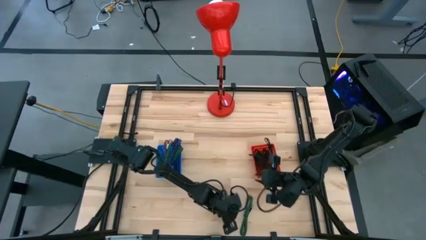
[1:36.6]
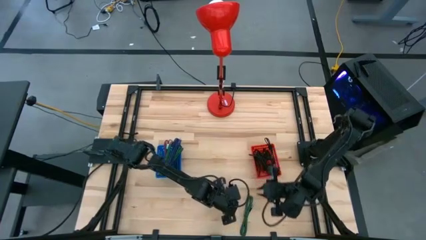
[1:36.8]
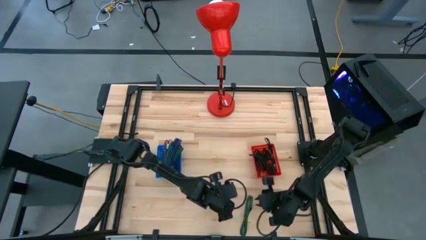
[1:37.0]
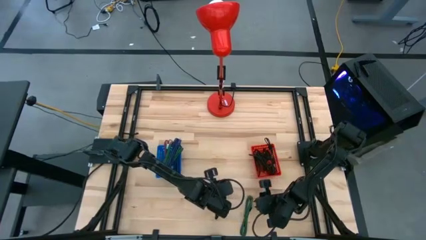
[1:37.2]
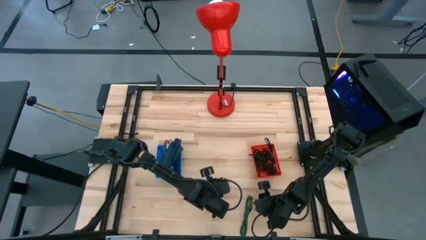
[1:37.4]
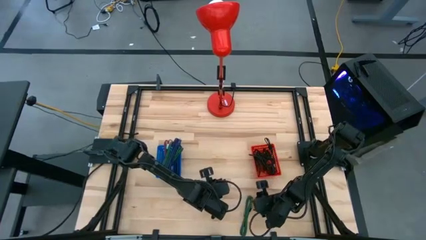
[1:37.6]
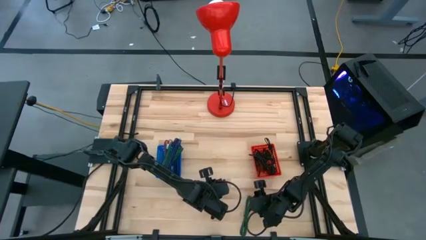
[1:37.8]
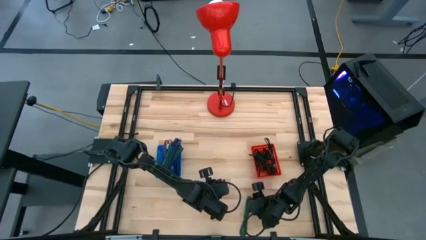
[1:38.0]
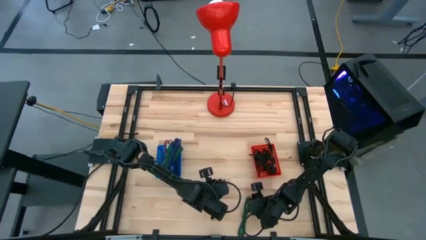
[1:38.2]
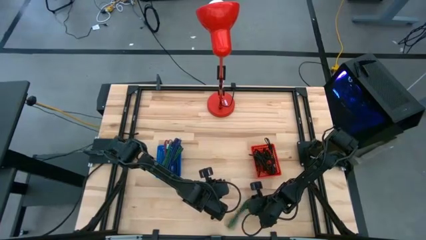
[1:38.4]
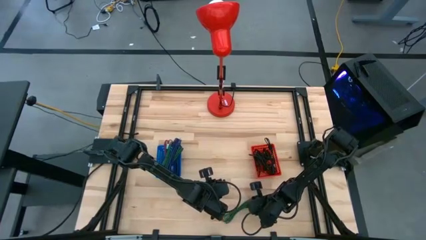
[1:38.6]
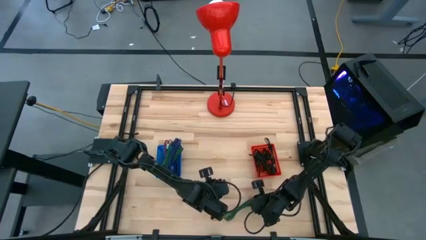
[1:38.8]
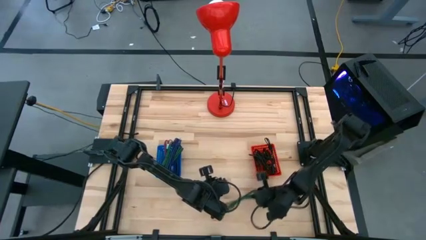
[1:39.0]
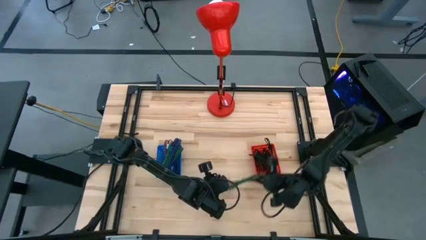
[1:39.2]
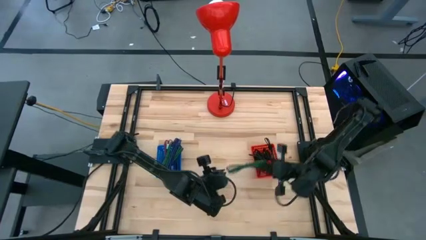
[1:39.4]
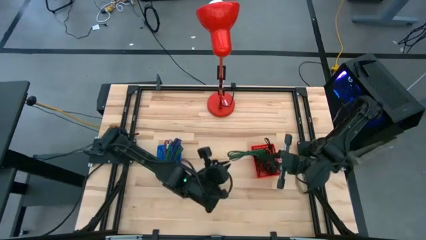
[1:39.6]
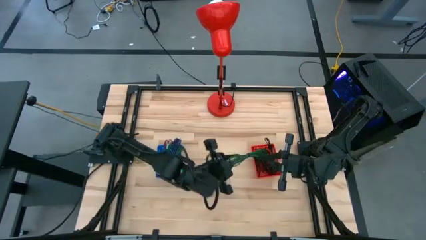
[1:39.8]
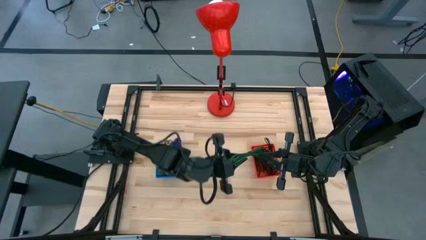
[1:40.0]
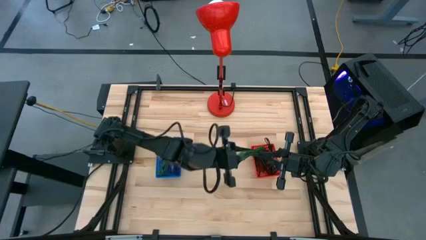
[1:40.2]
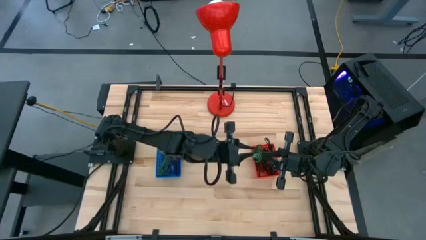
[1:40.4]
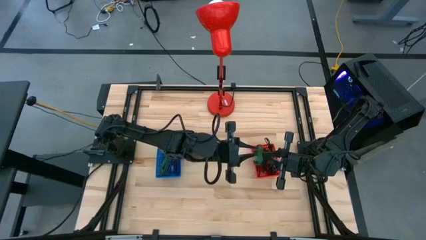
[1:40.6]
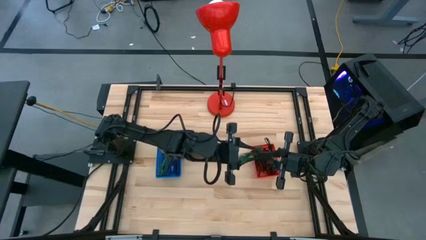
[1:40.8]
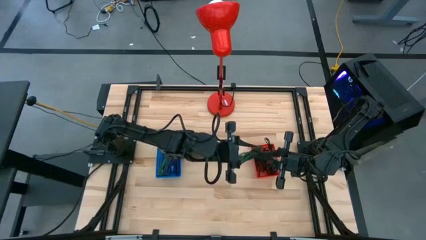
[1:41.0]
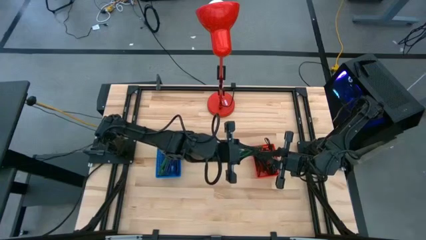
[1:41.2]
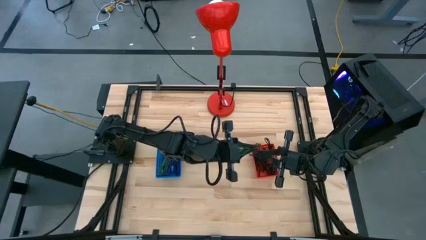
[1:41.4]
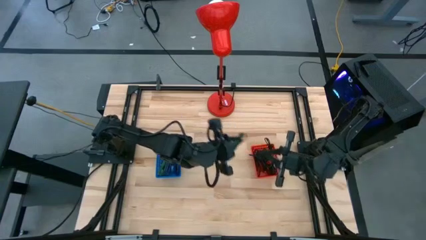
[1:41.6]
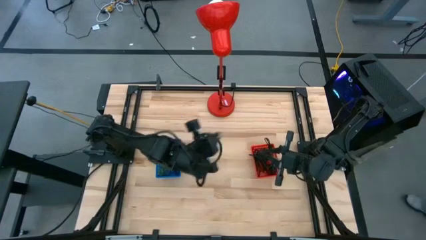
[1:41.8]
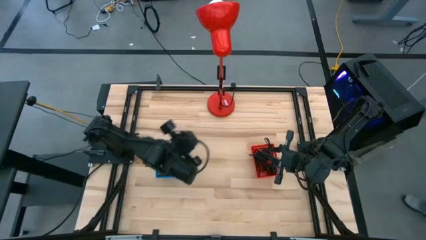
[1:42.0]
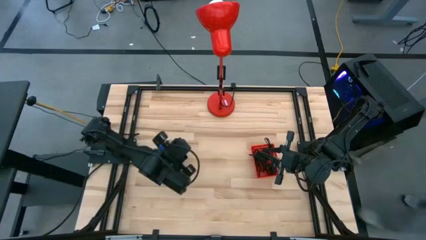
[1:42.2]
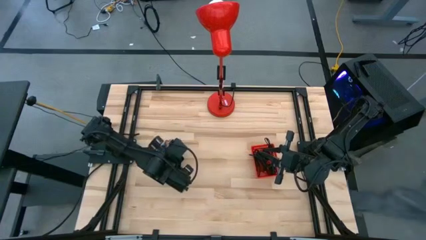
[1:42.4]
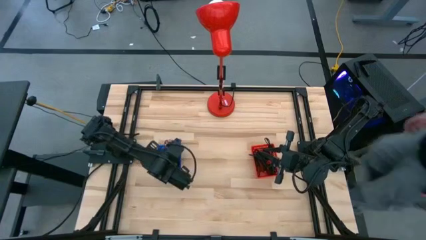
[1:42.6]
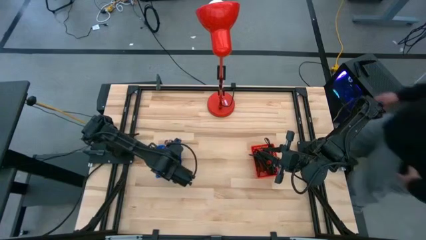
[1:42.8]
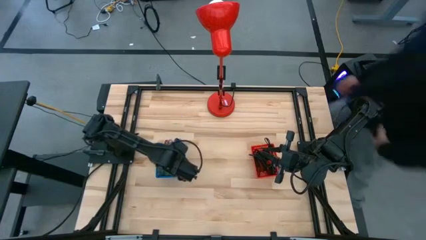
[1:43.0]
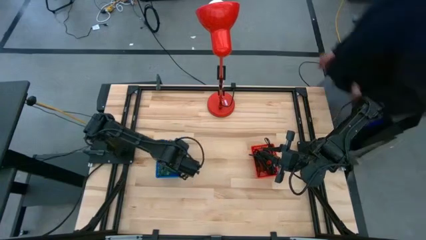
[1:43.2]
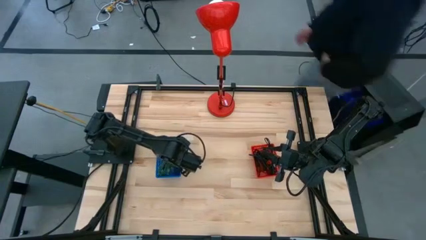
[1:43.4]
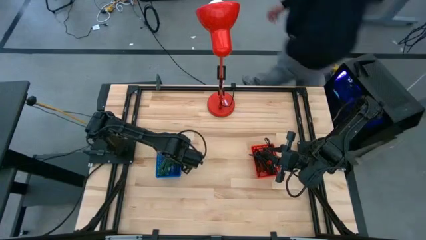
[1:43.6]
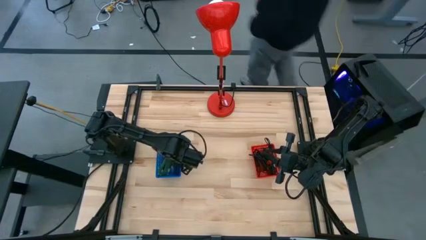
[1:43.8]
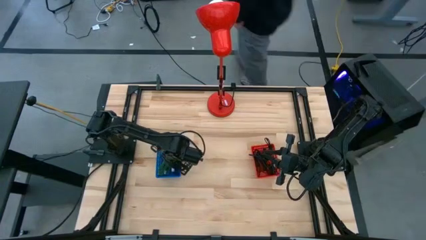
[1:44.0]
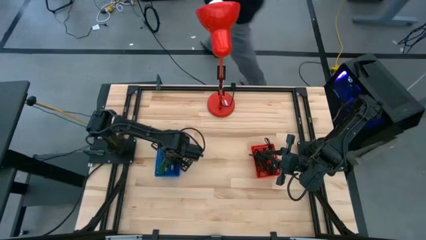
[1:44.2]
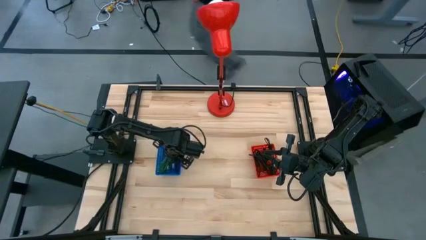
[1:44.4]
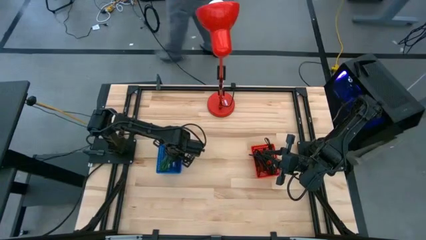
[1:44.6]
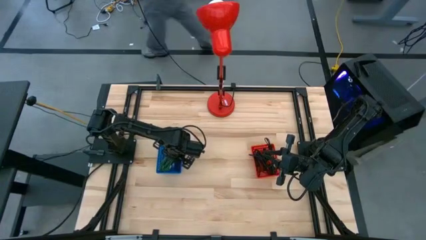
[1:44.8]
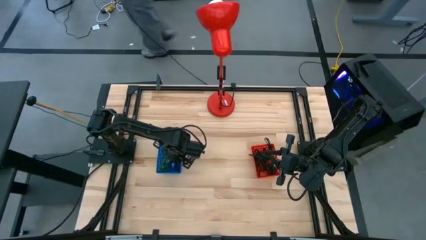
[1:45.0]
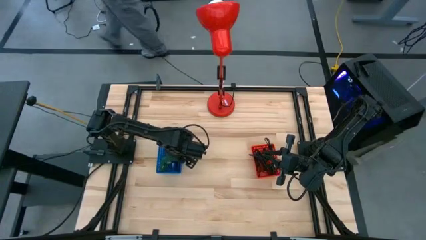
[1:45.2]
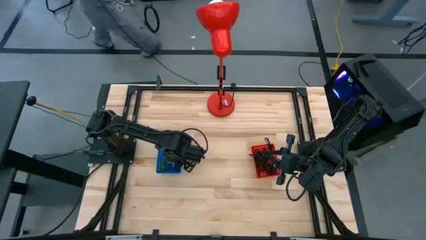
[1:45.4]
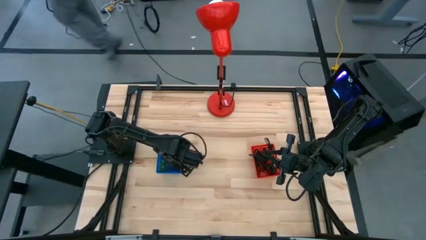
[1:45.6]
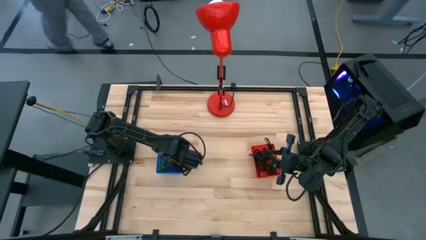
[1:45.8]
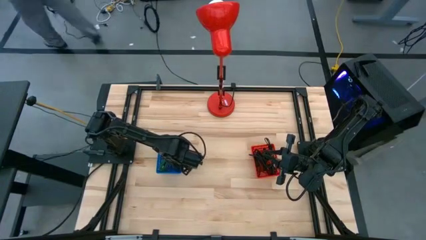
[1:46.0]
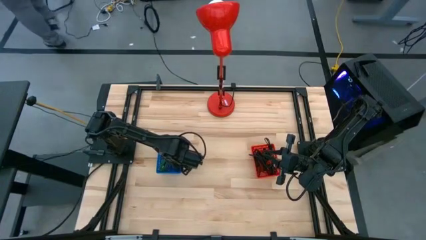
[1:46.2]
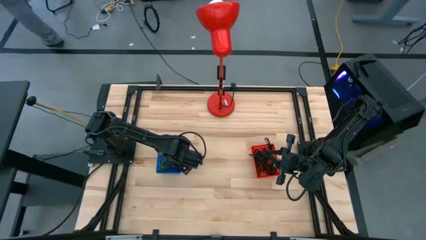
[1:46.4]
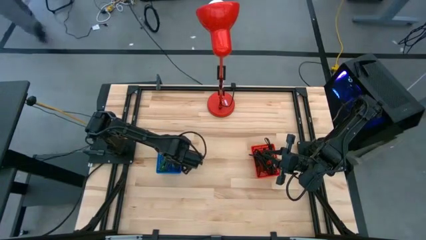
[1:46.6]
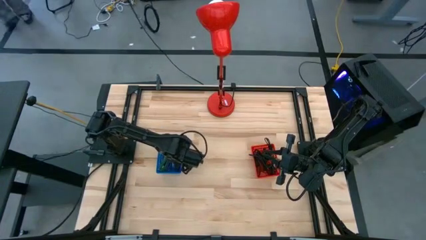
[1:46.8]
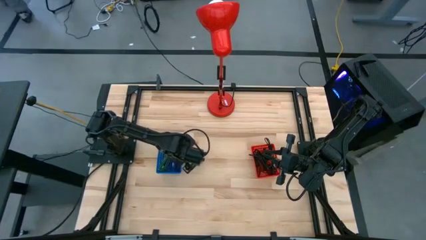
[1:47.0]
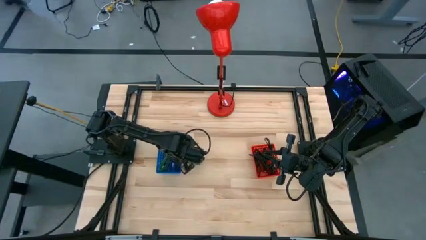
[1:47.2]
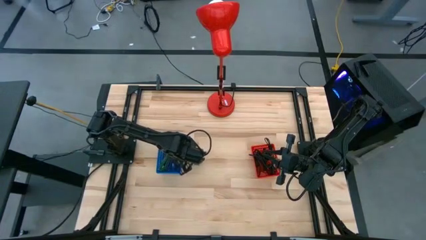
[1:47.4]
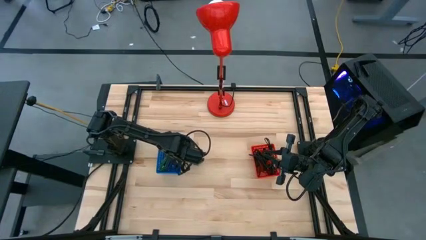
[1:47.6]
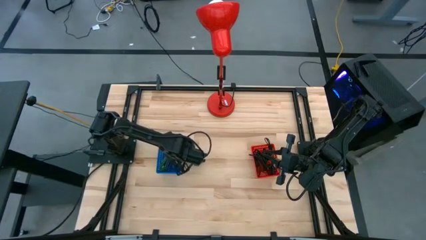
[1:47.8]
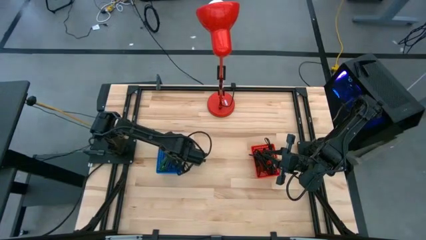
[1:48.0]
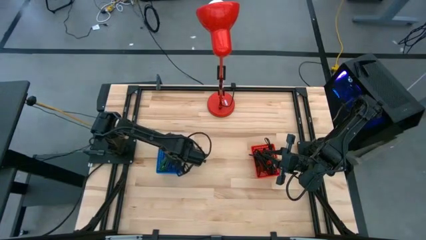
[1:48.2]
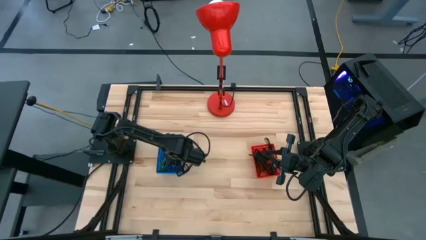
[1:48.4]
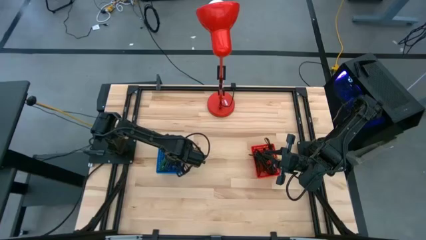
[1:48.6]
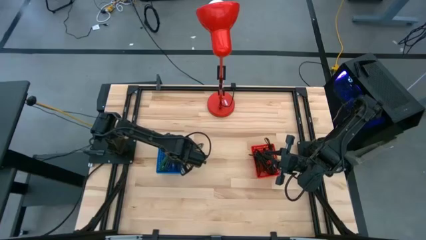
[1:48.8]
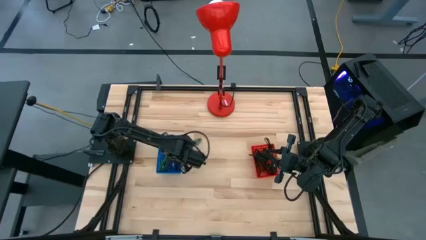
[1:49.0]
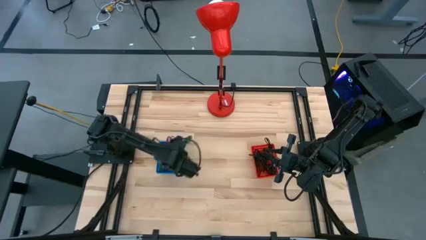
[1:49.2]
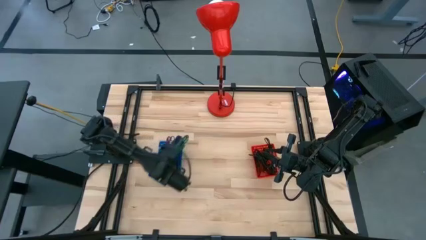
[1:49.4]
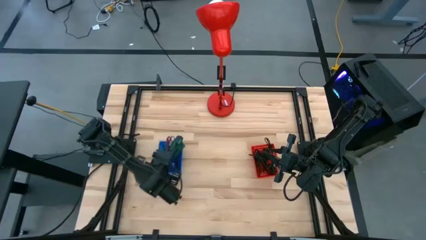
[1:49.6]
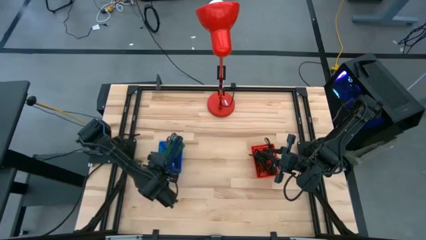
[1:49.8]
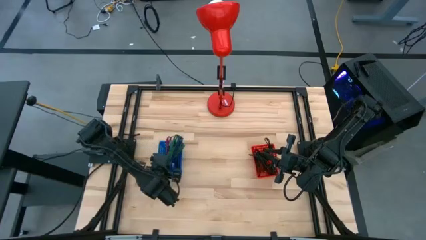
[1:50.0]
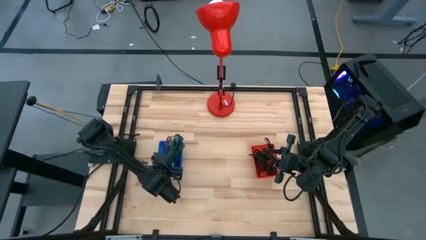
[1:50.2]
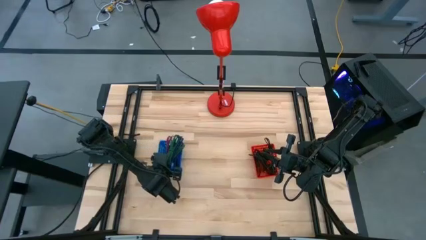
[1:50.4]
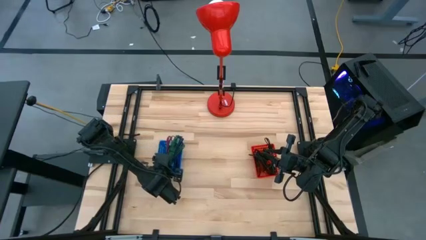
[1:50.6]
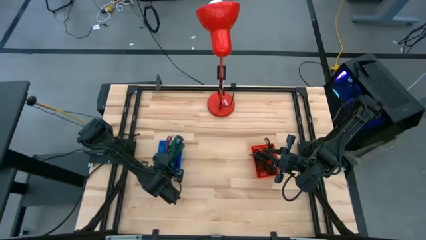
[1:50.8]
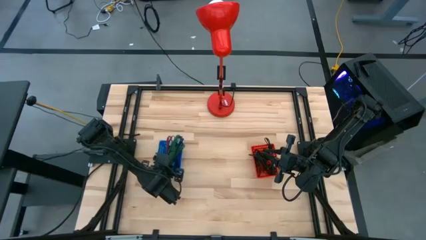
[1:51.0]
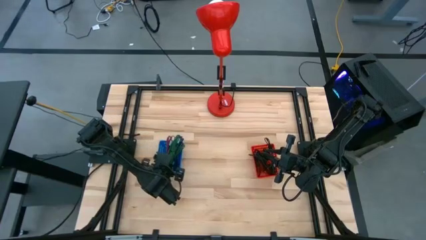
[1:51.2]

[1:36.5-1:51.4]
Task: Pick & Place USB Port
Put the green and black charger cable into the blue bin
